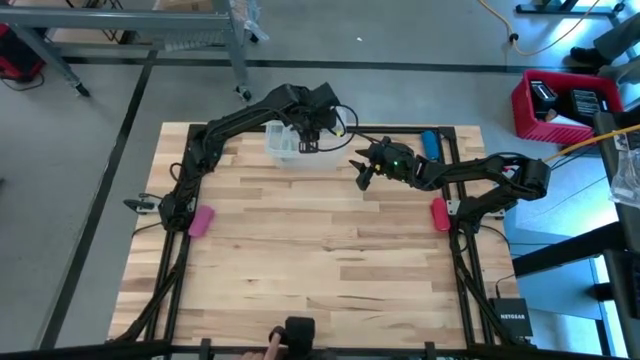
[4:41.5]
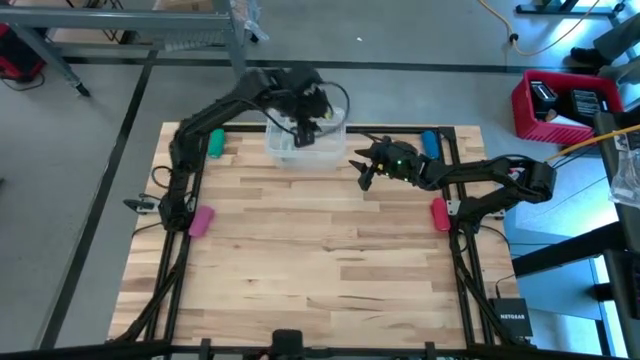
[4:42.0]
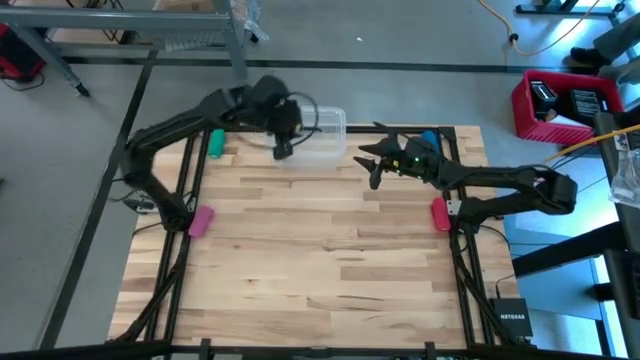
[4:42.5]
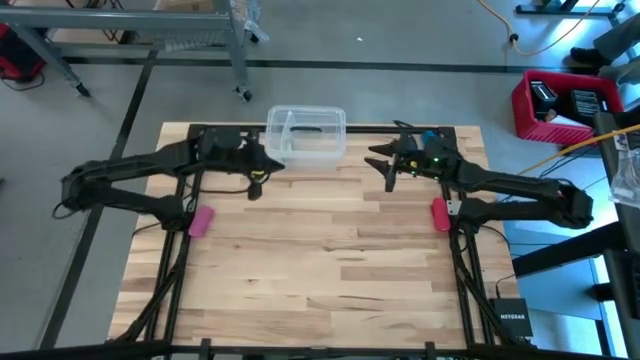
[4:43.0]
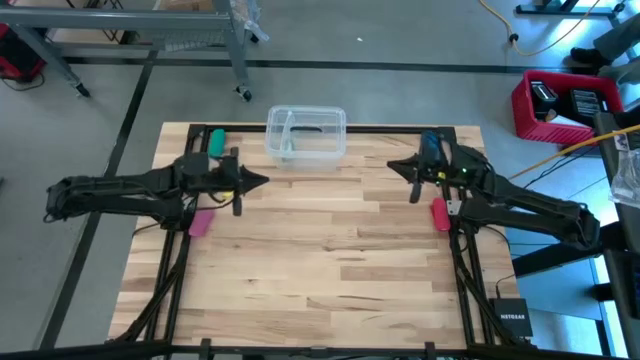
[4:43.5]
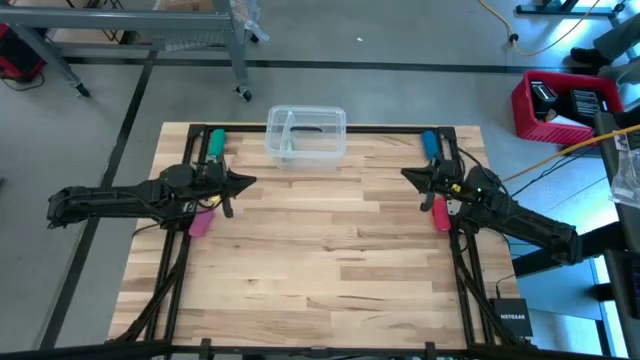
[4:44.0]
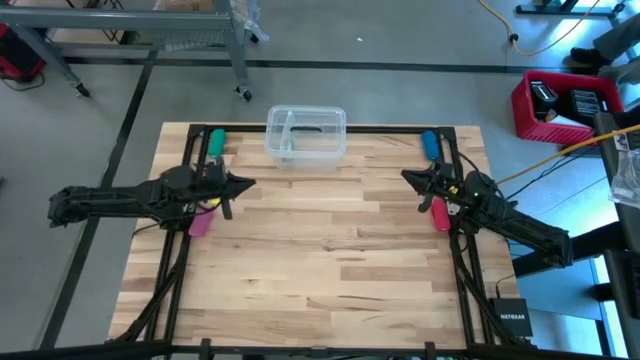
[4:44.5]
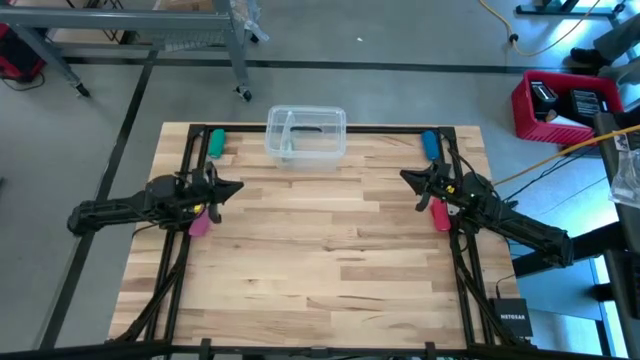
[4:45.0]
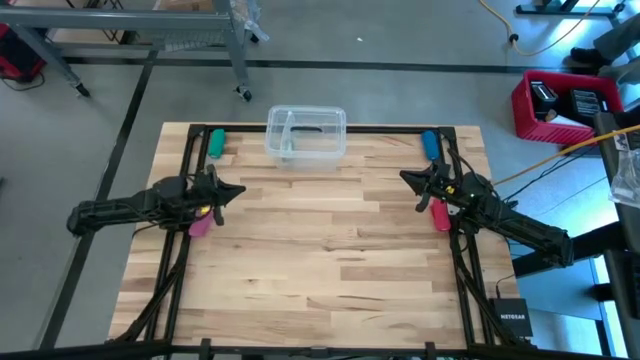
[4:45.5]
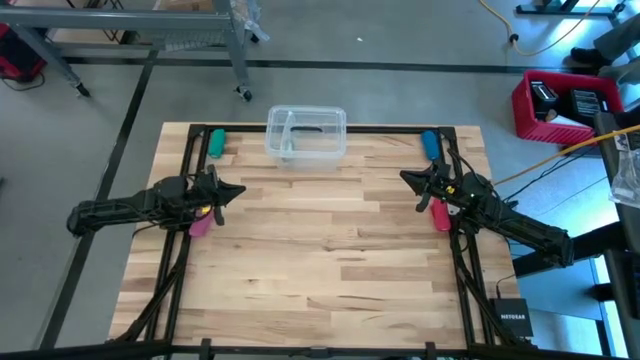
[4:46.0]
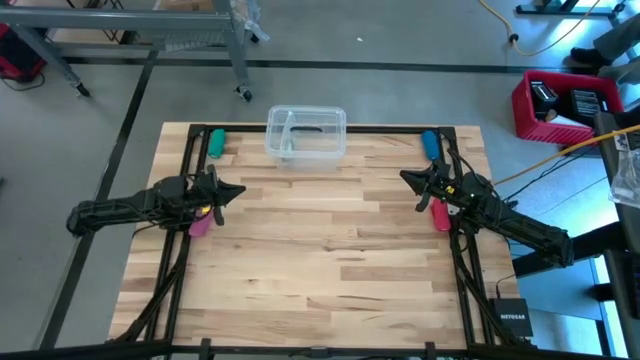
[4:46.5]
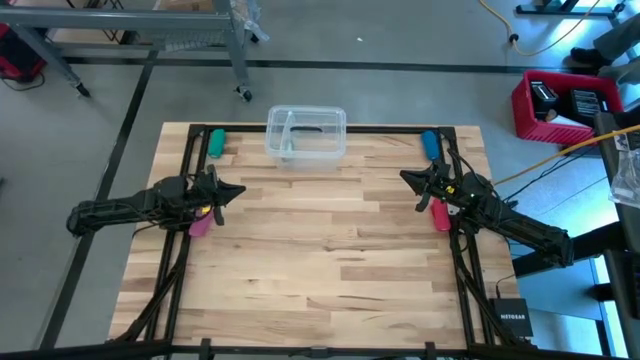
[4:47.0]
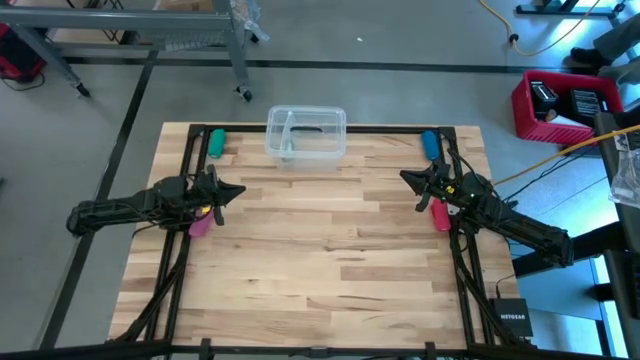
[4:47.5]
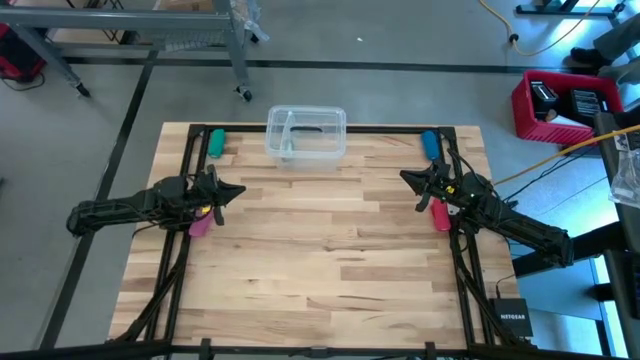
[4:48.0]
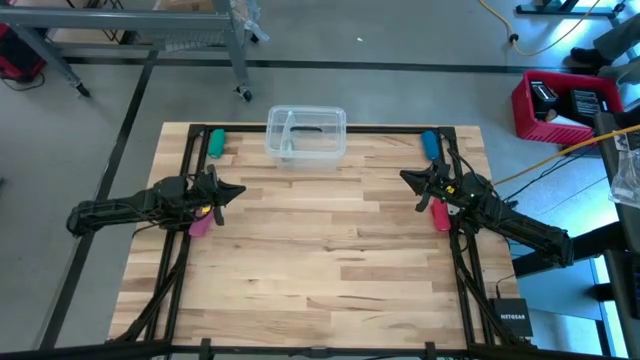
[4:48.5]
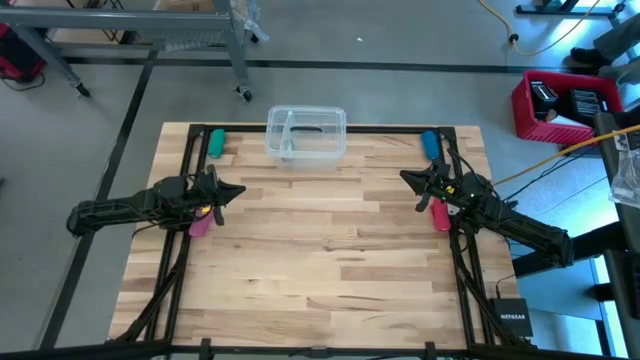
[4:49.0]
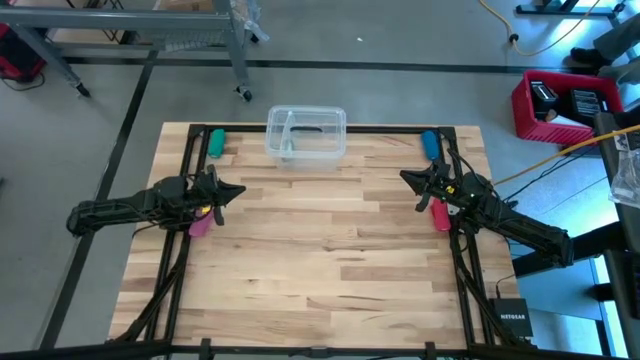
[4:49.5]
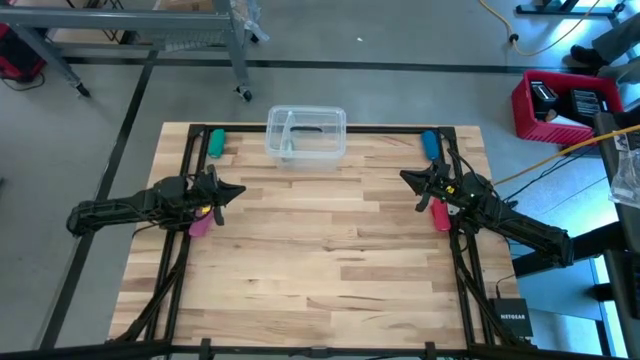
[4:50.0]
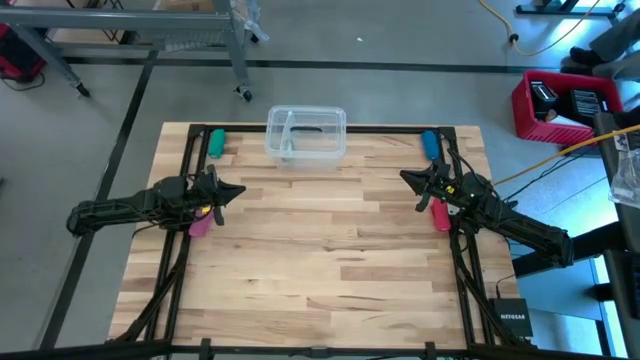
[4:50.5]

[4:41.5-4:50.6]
Task: Roll bandage
Return to Home Position

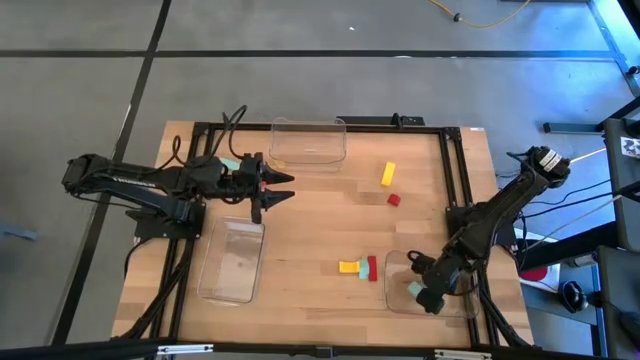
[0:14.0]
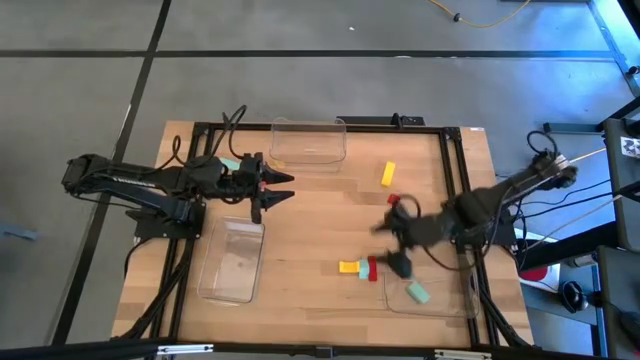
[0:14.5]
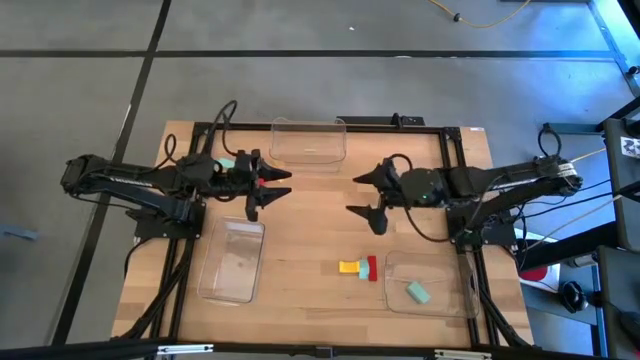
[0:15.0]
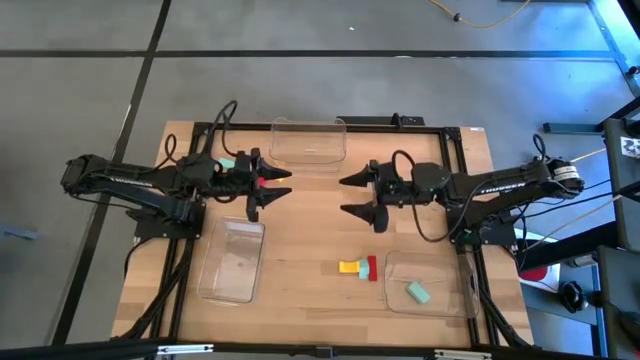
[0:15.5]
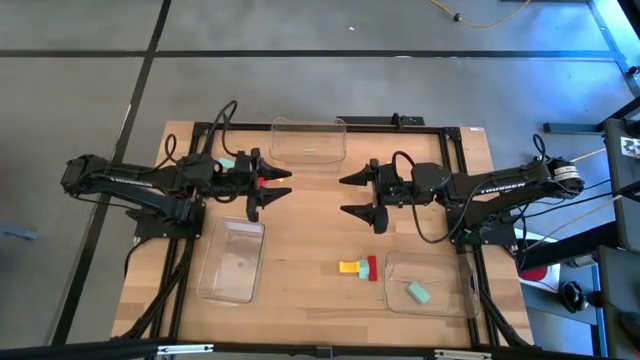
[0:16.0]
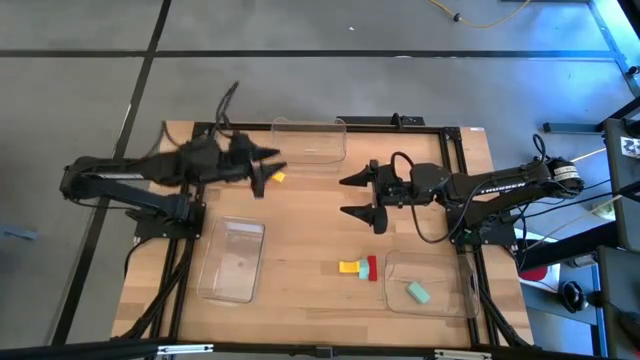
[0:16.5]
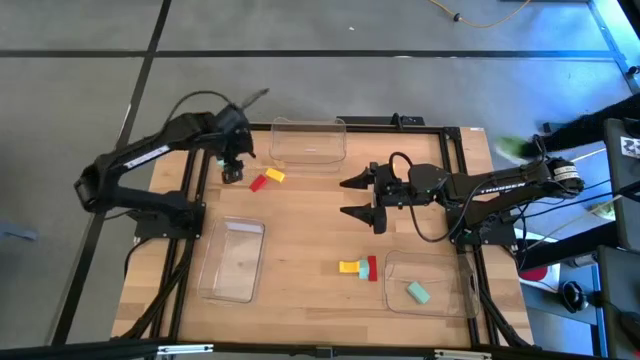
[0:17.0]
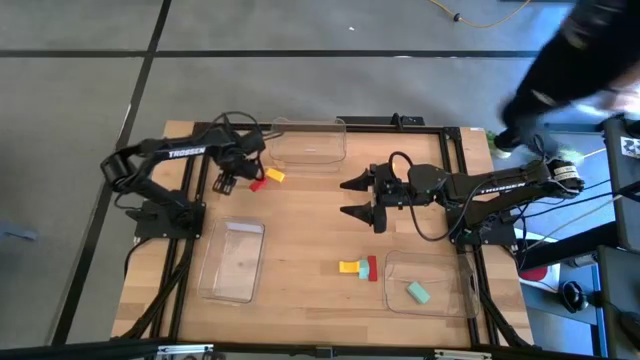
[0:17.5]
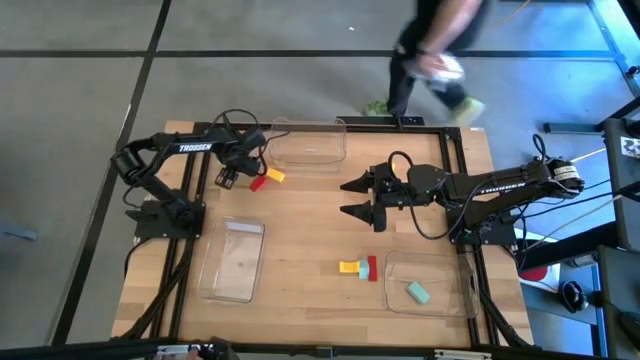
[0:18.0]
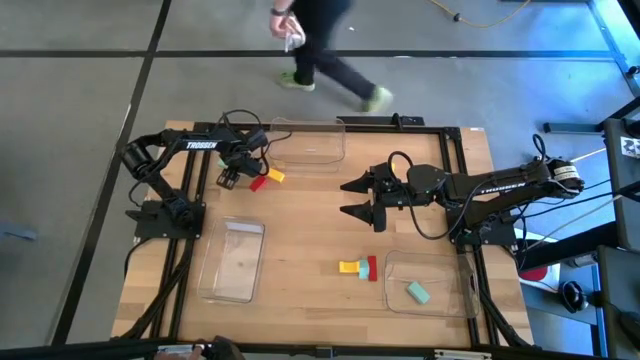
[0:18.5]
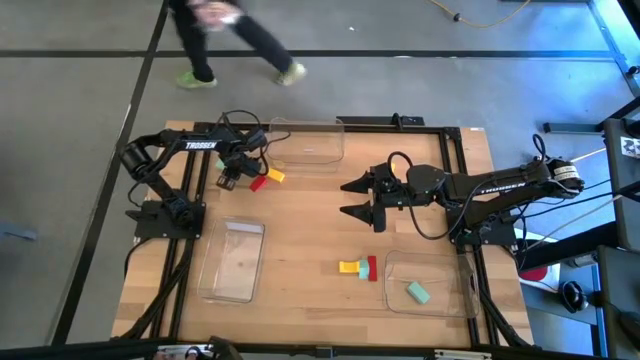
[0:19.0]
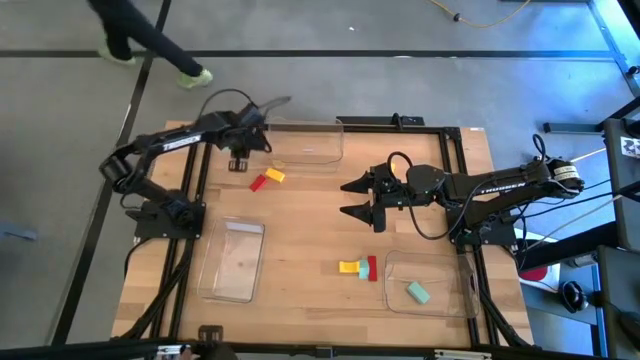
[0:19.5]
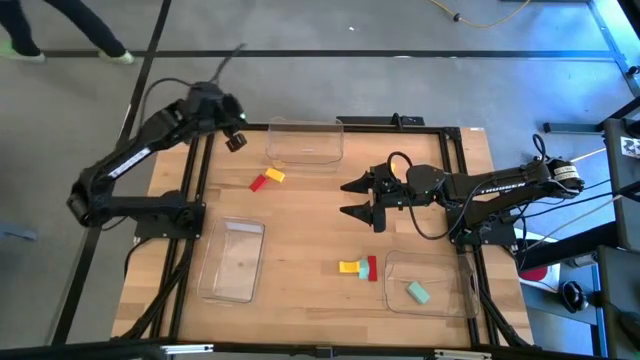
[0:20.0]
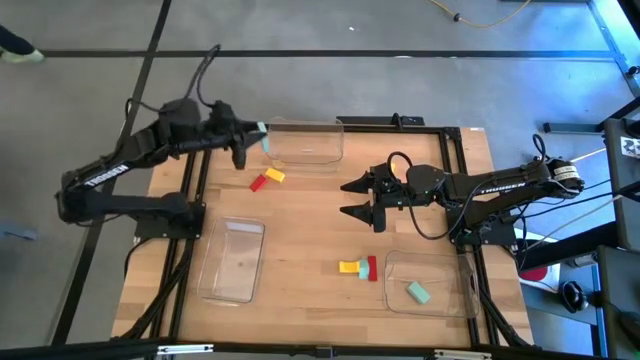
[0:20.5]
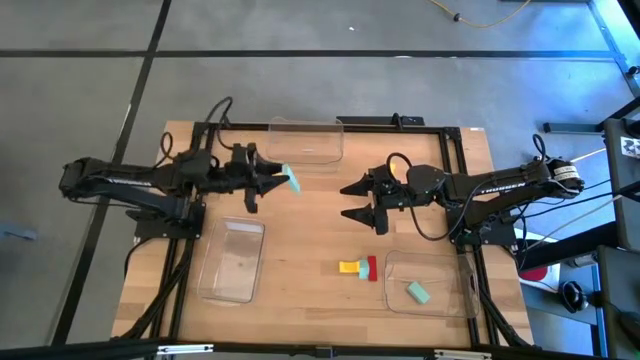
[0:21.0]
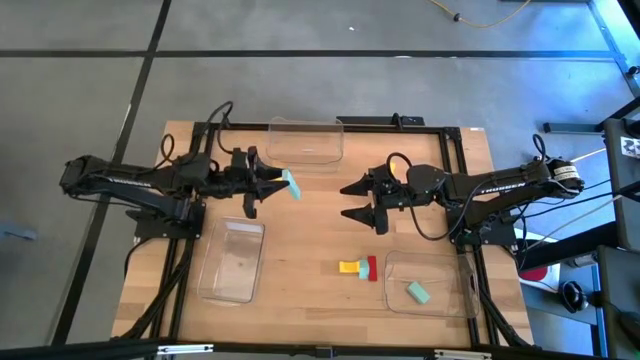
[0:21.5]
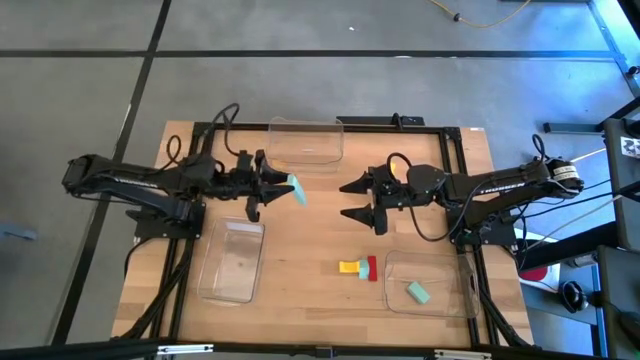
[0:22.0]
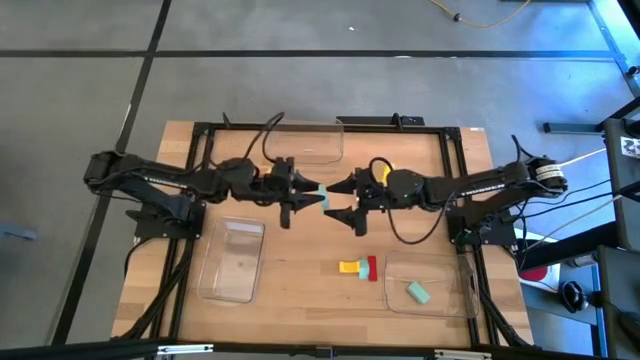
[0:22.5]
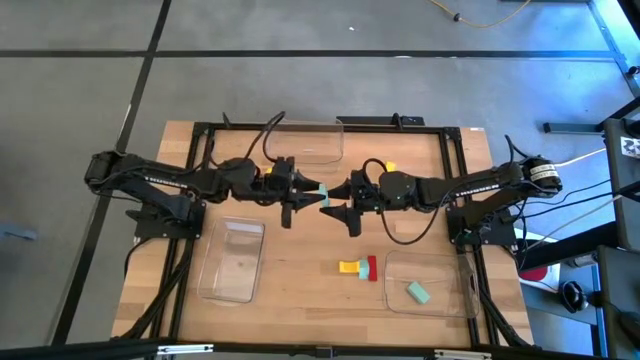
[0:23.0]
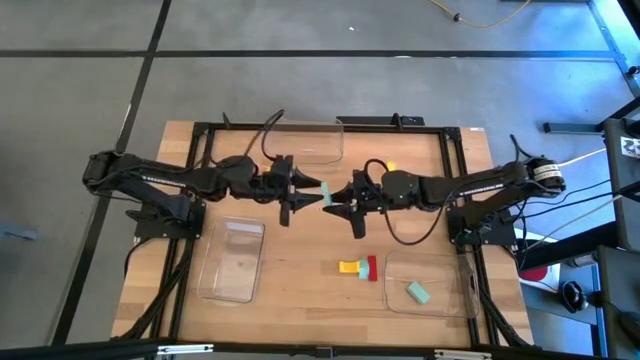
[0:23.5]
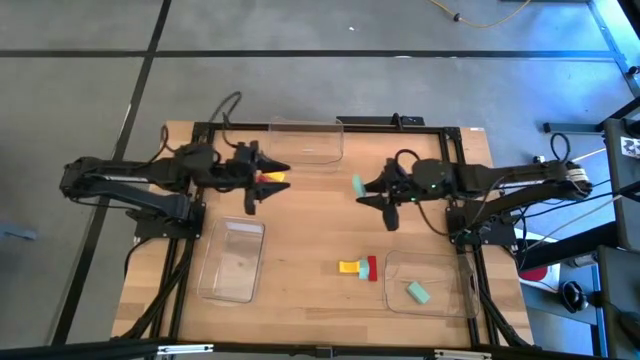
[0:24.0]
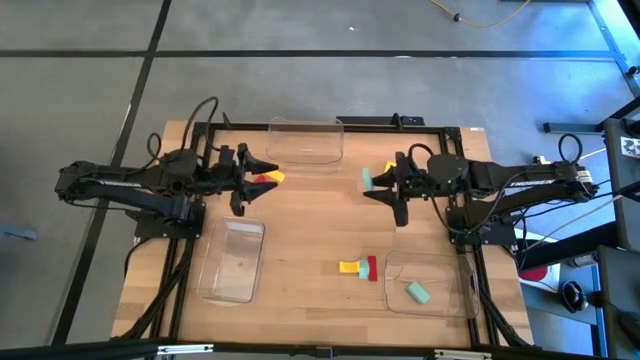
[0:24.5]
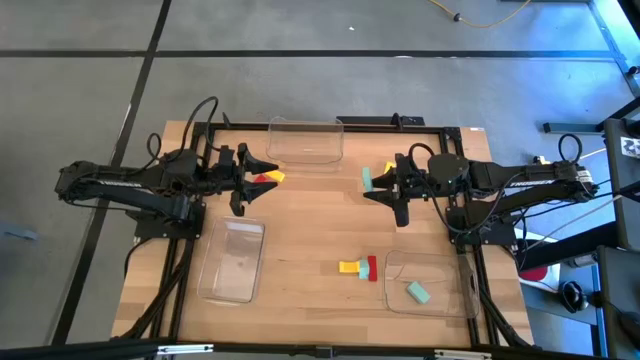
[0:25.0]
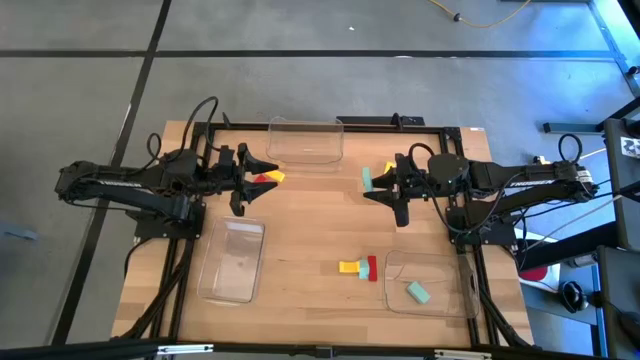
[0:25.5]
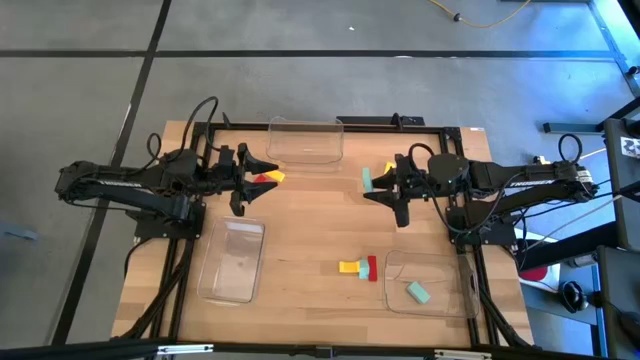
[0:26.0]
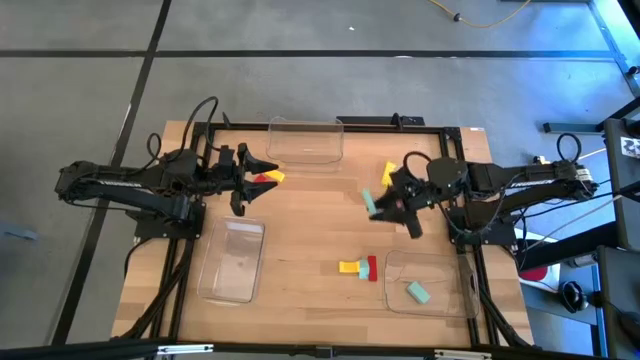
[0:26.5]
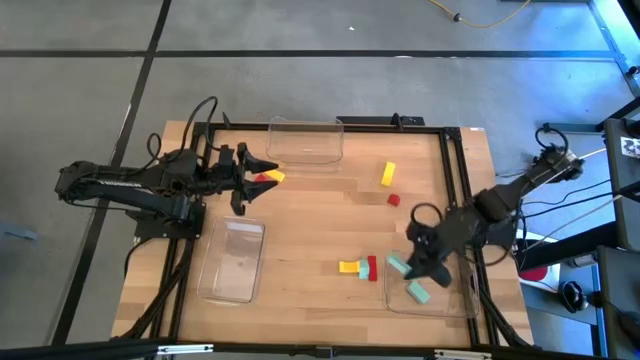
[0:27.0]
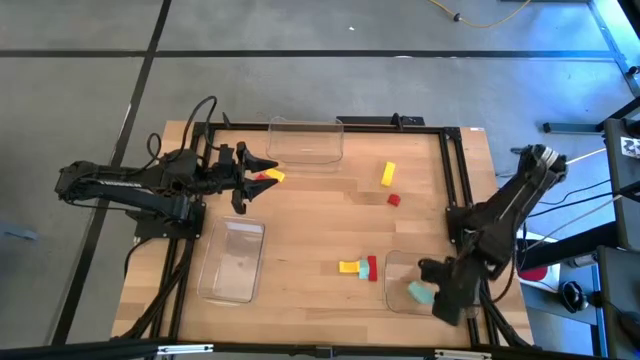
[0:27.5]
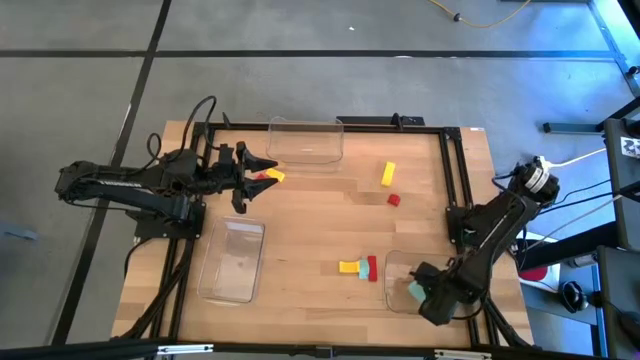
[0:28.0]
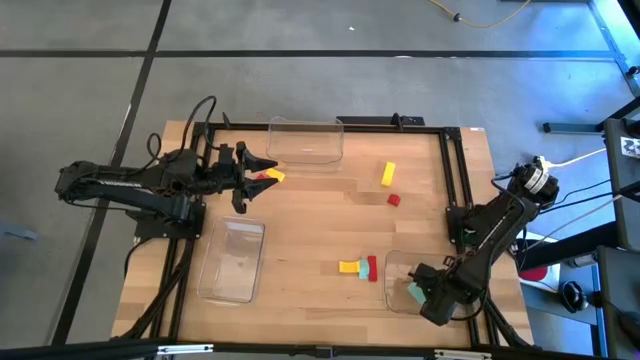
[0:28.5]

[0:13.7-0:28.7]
Task: Sort & place blocks by color
Put the left light blue block in the right transparent bin
